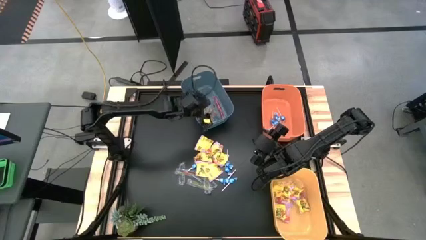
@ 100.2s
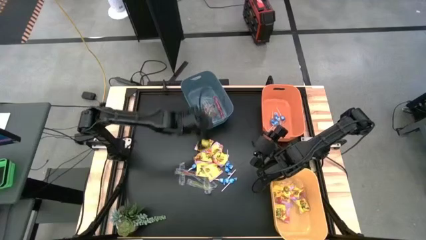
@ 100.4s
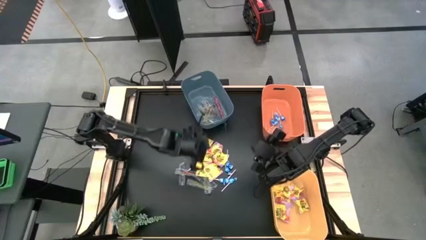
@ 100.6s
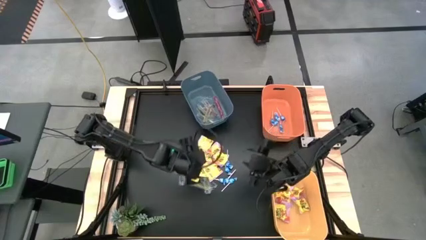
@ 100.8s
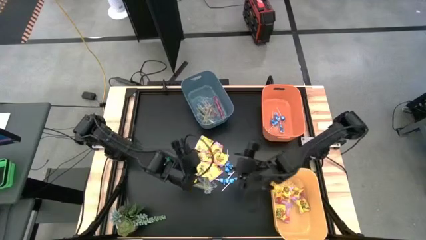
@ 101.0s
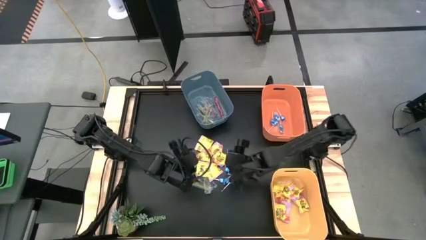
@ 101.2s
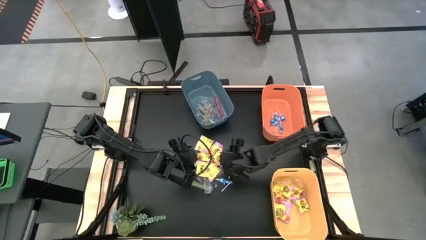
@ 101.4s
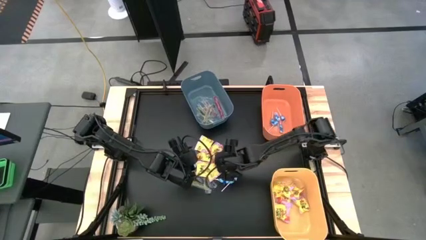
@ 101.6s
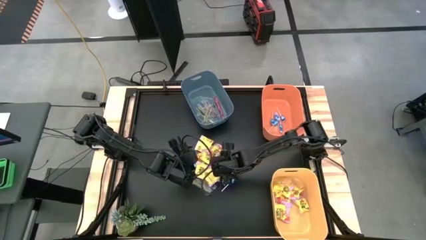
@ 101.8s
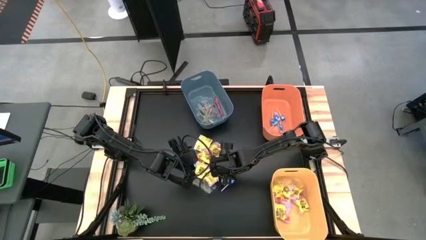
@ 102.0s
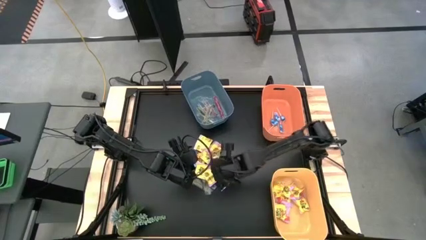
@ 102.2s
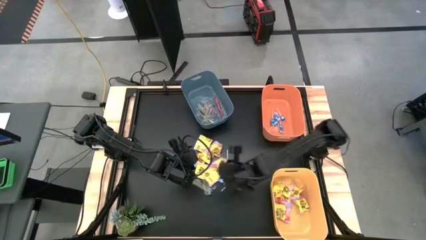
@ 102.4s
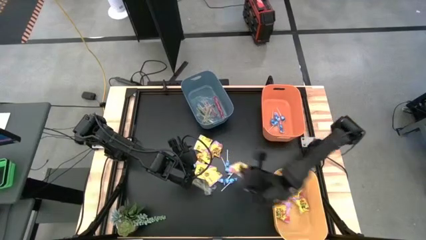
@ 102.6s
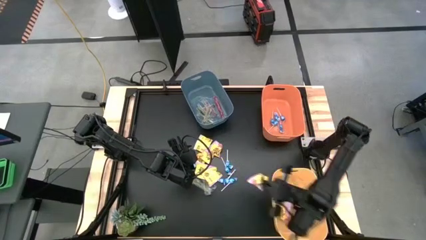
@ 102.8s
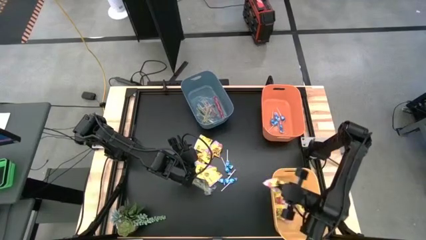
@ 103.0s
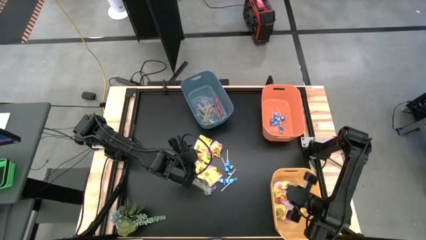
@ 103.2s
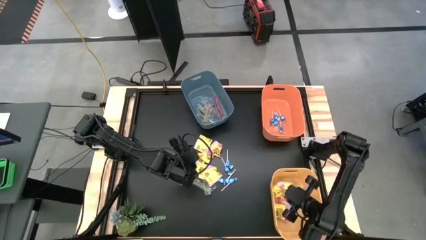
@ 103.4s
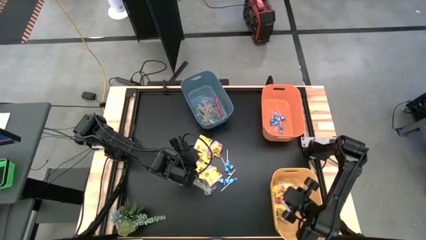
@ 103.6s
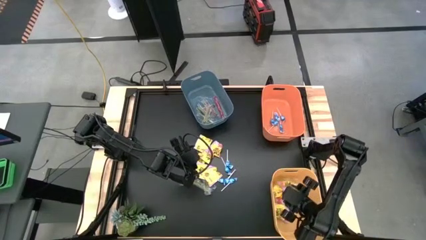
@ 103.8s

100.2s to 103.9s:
Task: Sort candy
Put the yellow candy into the yellow bin

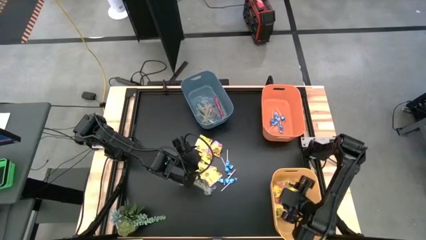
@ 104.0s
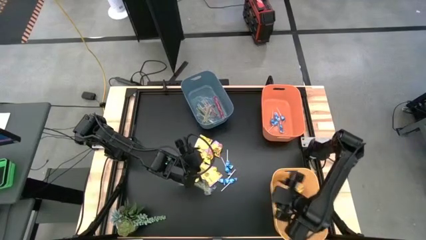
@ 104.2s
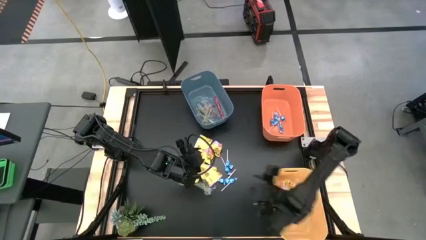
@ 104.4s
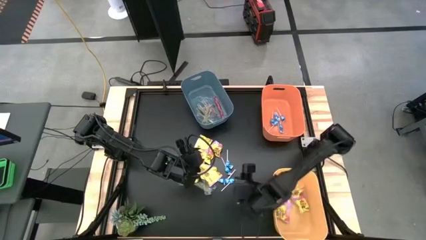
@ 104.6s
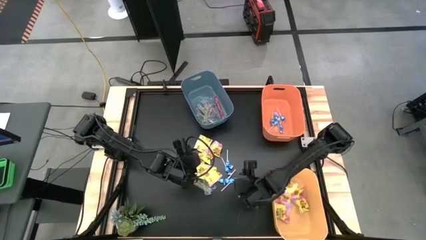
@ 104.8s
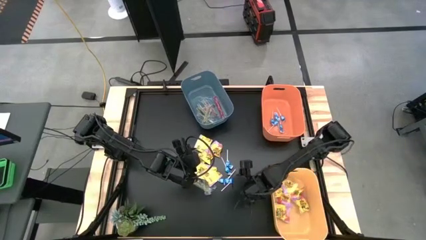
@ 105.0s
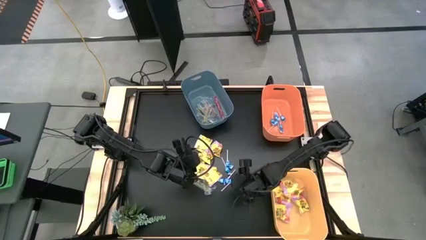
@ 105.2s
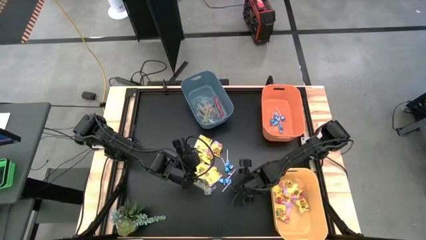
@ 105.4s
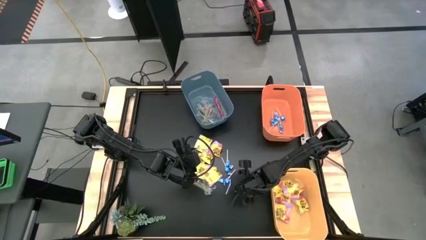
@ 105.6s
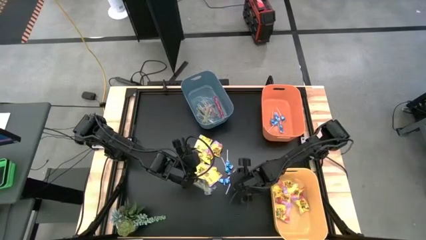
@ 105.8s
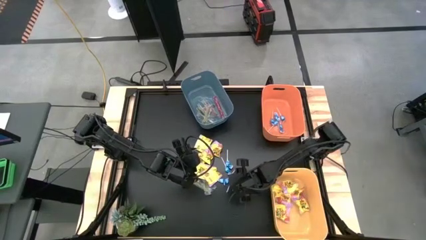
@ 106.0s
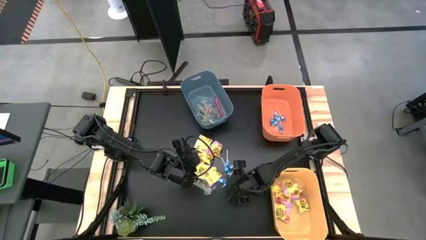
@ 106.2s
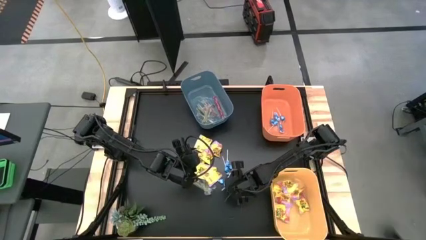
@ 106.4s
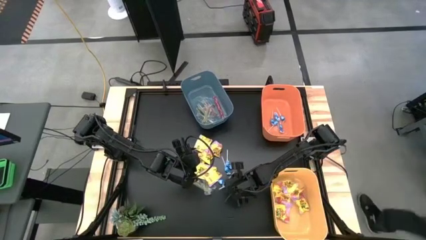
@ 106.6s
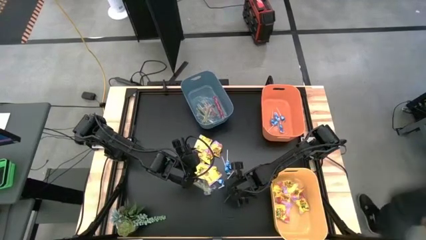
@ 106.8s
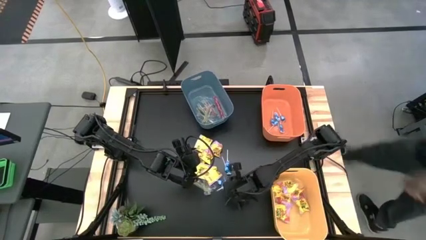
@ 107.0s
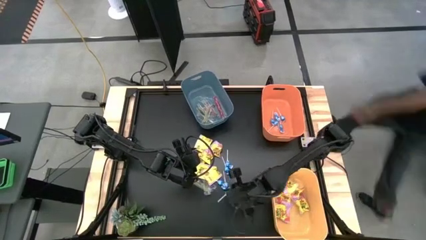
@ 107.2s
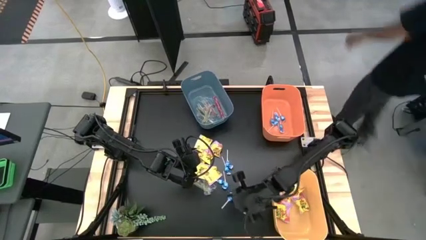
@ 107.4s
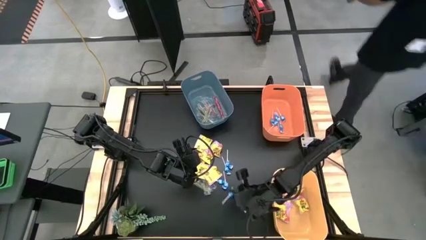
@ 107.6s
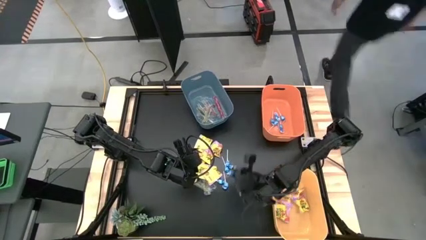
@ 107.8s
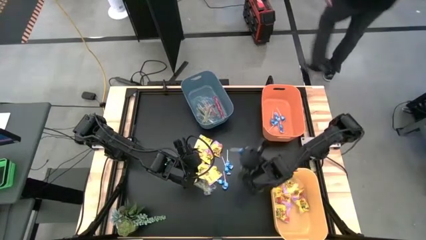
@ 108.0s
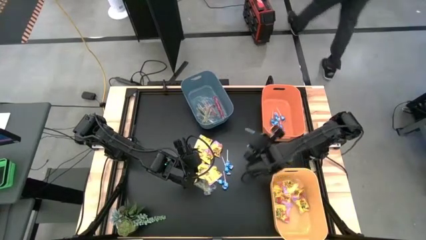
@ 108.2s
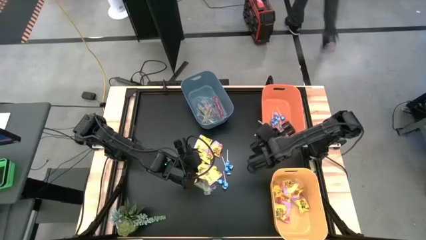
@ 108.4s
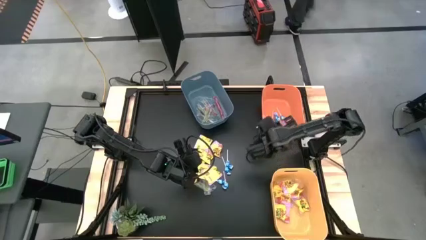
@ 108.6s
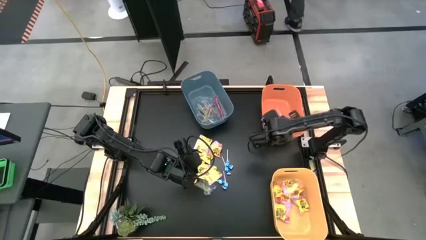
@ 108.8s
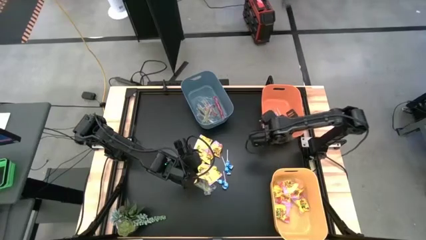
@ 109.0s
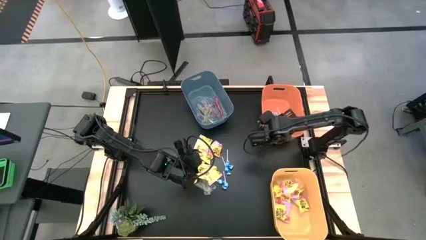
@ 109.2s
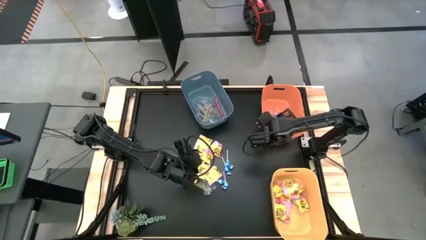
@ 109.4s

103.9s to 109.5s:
Put the blue candy into the orange bin

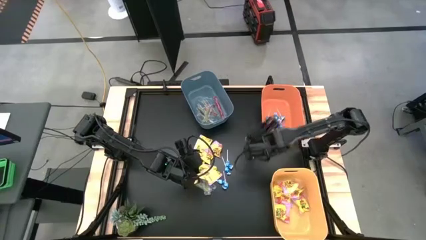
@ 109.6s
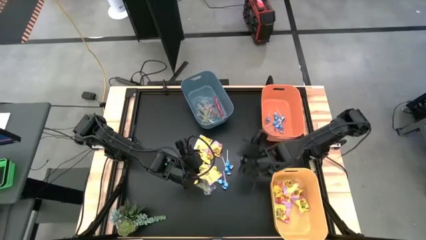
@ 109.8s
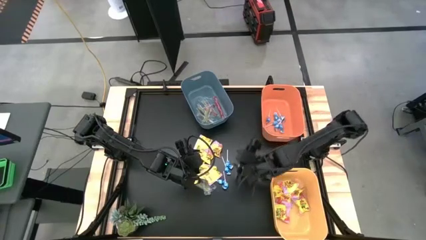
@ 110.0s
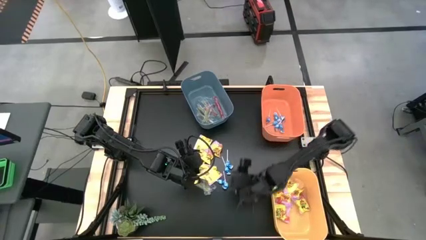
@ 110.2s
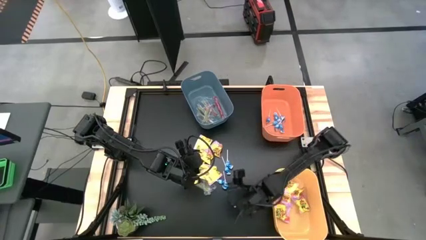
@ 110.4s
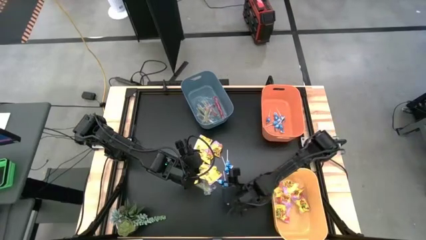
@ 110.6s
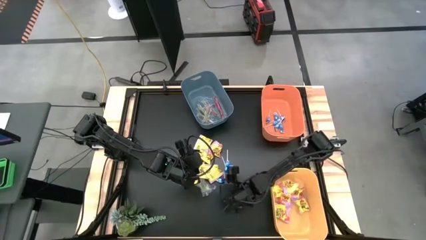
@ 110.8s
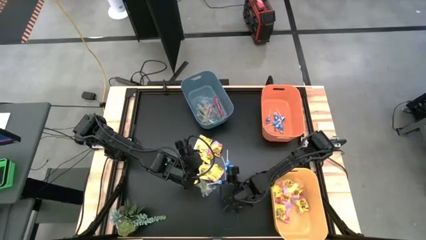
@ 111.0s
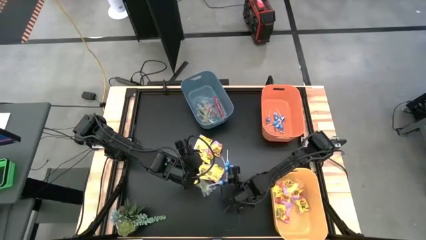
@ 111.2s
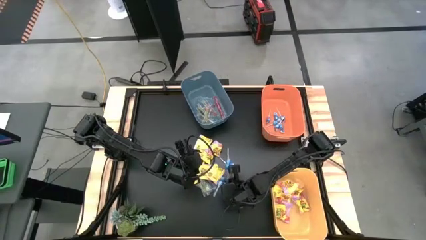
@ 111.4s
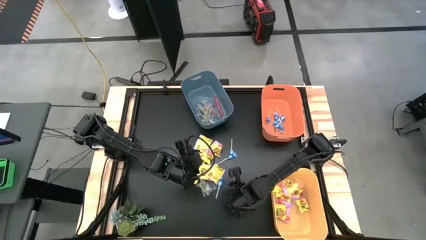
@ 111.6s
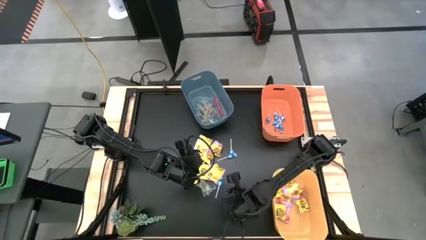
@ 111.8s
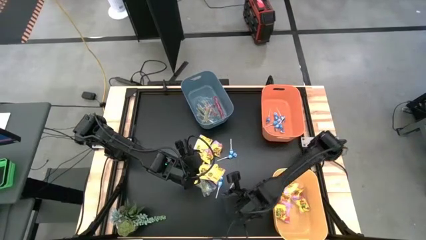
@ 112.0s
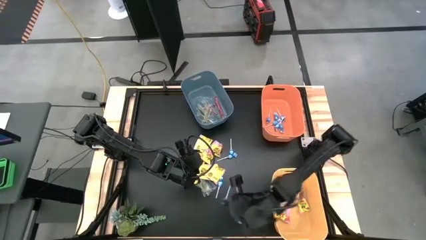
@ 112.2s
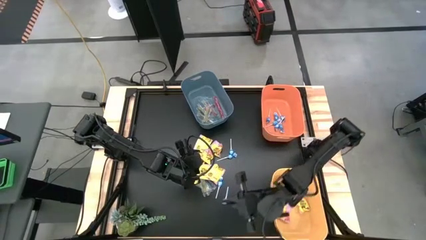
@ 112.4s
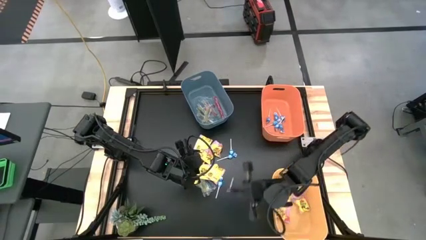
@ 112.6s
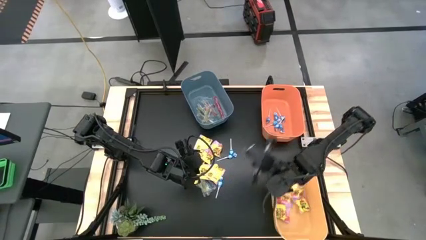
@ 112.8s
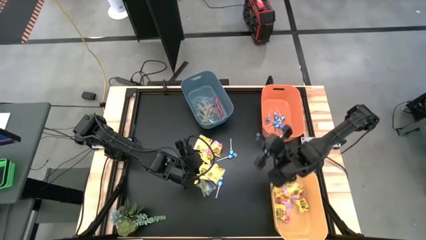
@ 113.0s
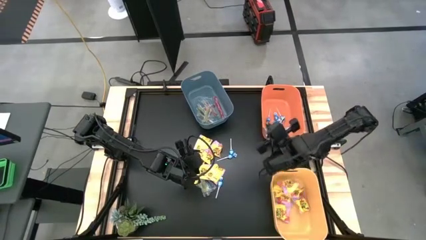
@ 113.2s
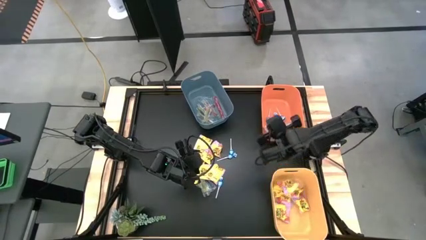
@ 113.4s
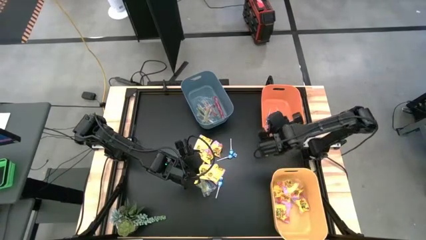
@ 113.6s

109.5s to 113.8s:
Put the blue lollipop into the orange bin
